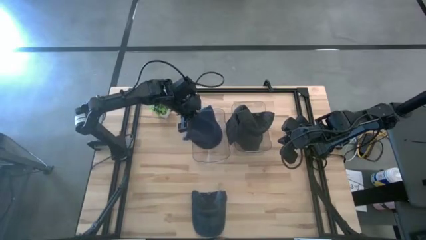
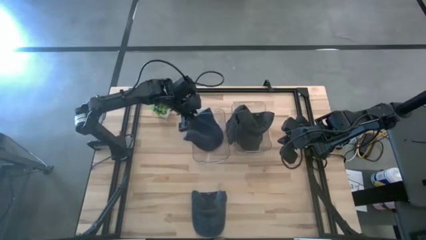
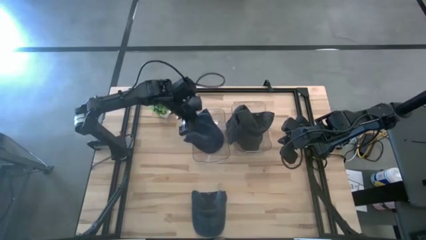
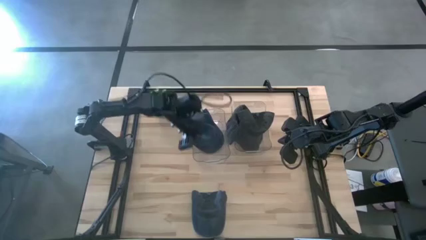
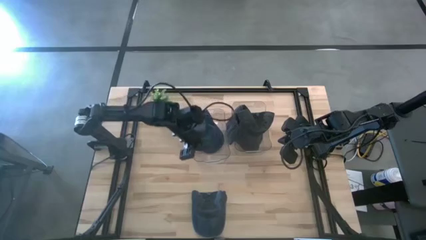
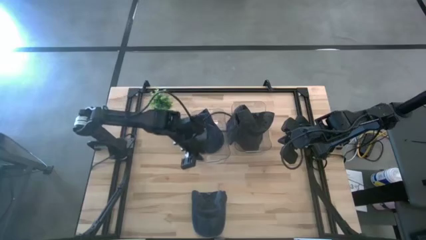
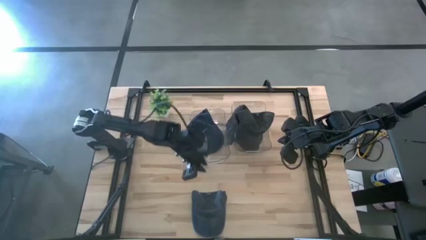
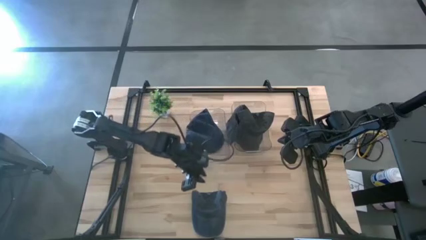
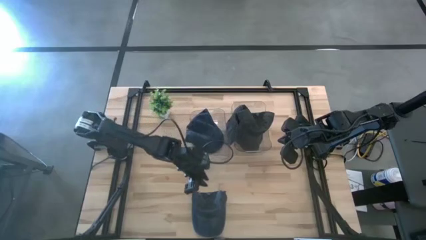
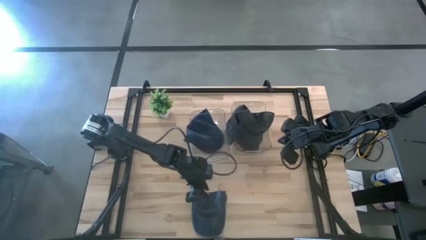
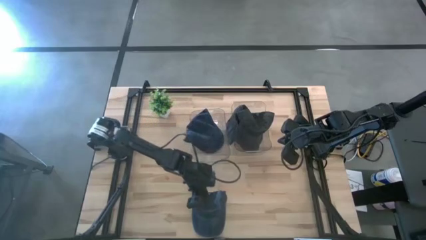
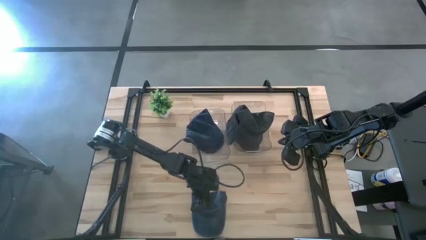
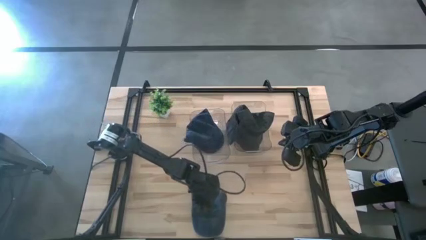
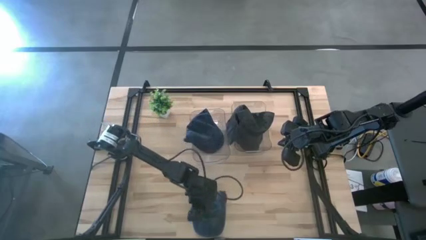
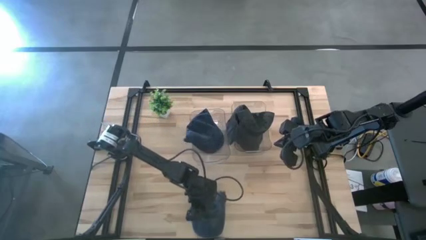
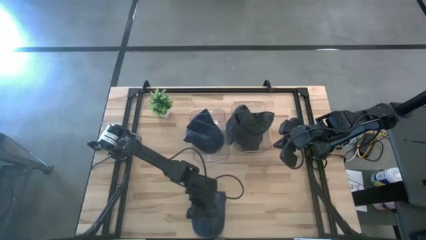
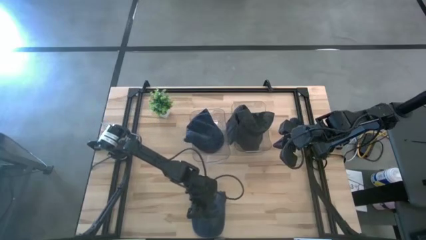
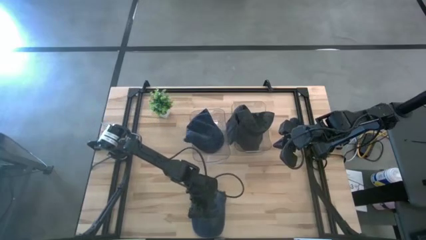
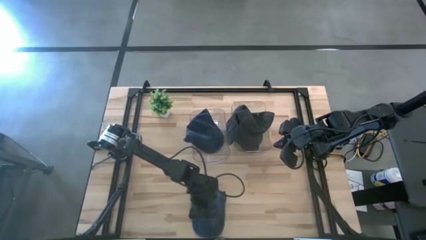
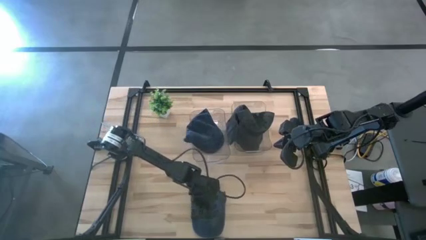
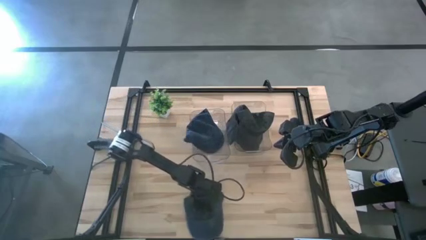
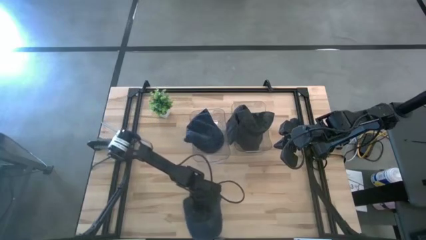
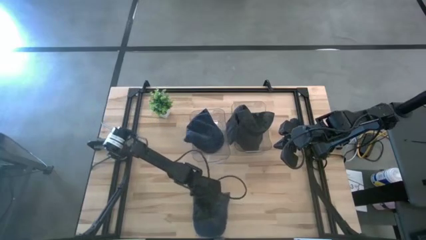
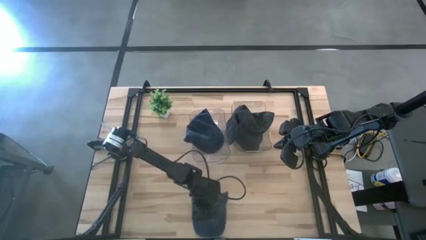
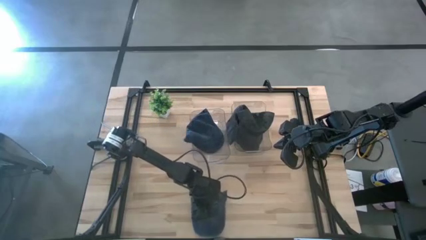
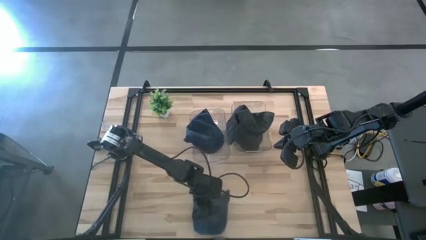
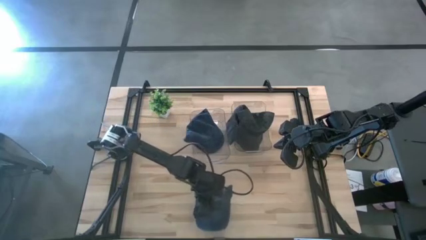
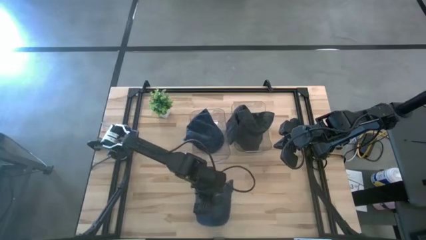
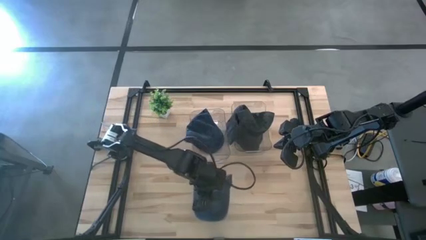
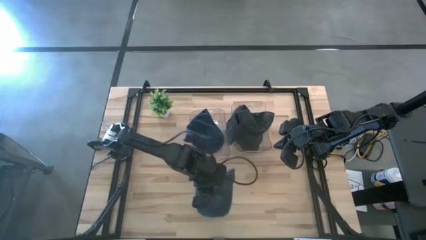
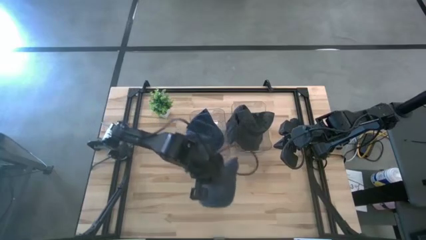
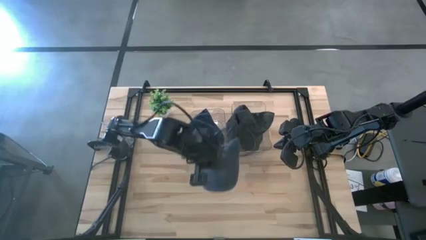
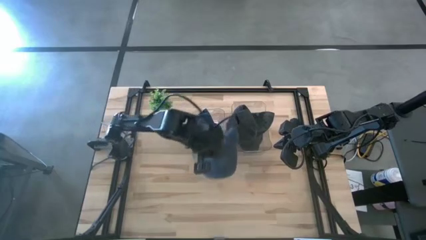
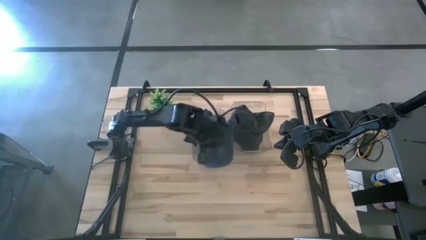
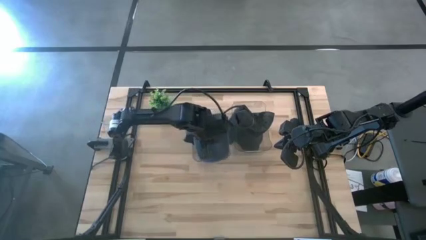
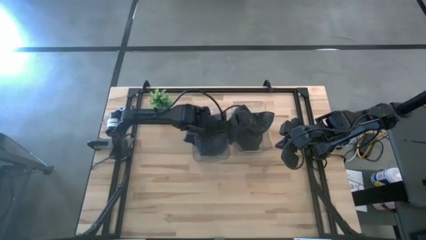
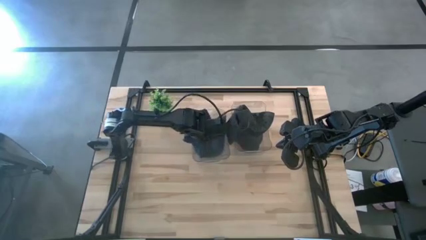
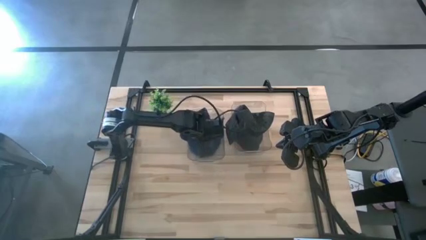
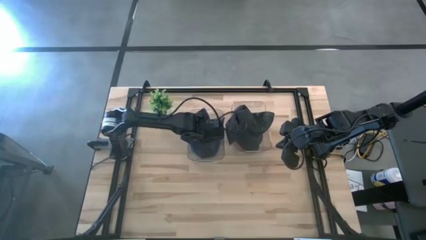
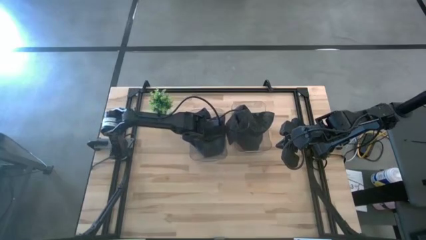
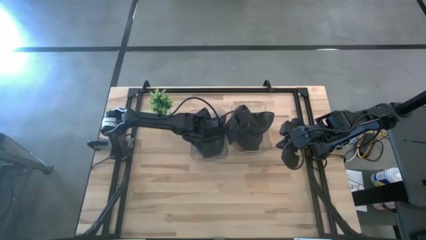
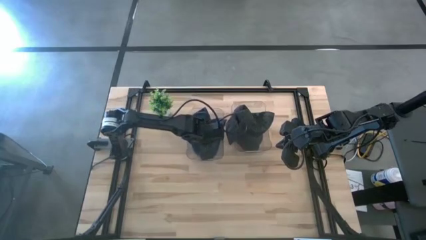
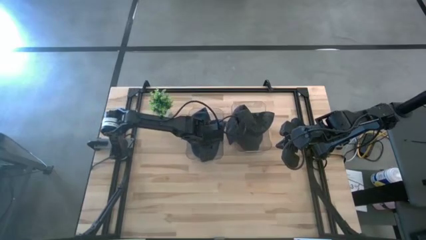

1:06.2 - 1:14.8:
Task: Pick & Place hat
Put the blue cap into the left transparent bin

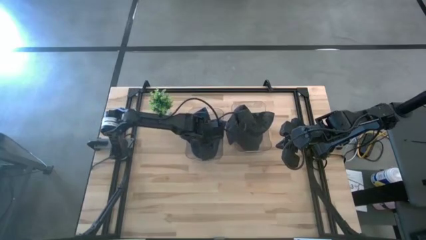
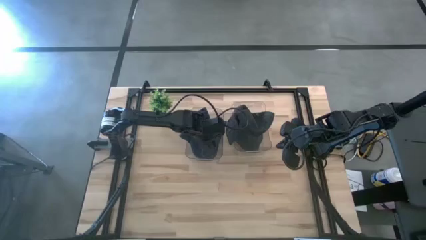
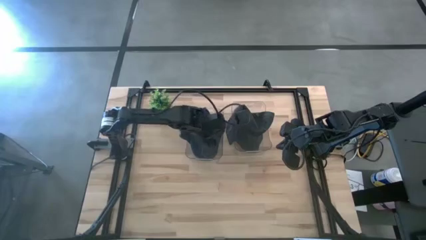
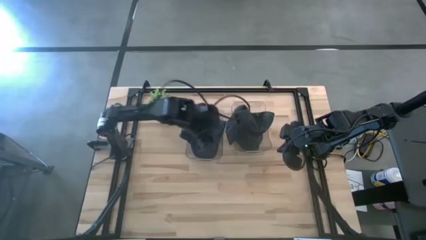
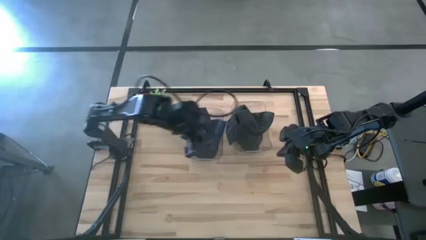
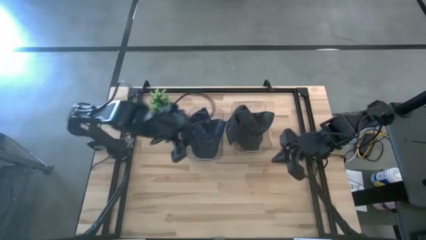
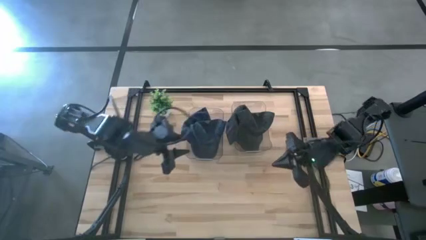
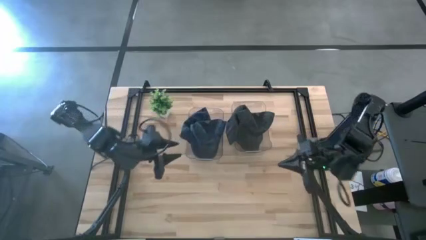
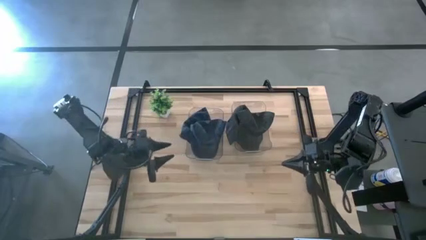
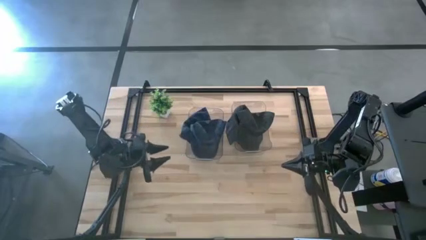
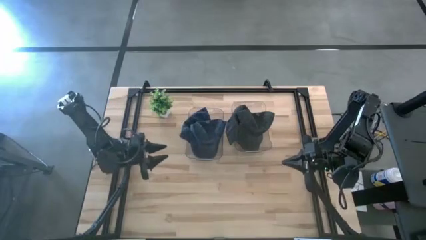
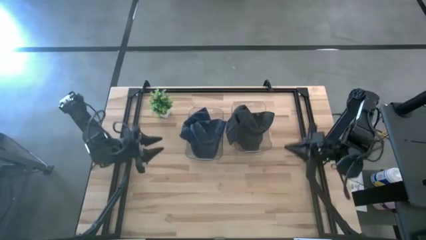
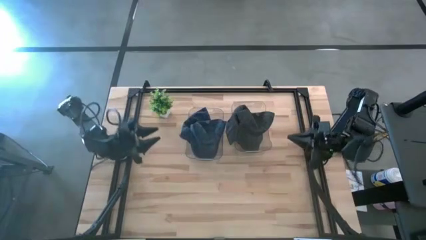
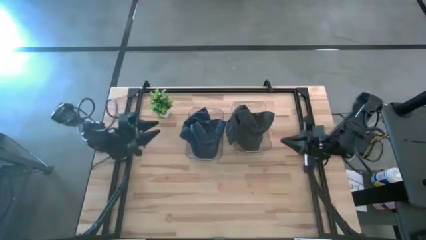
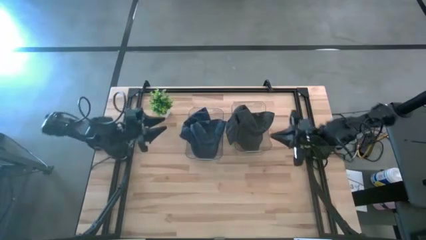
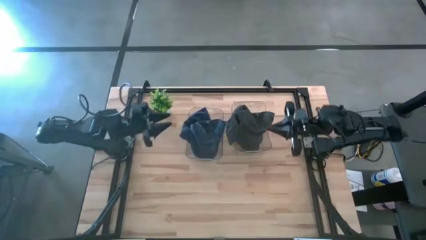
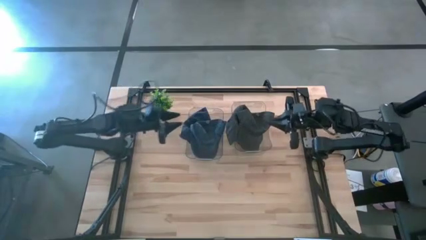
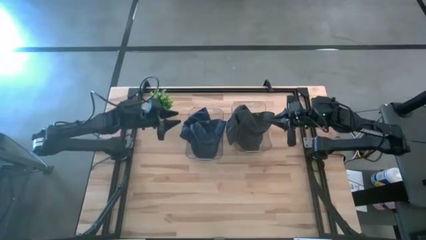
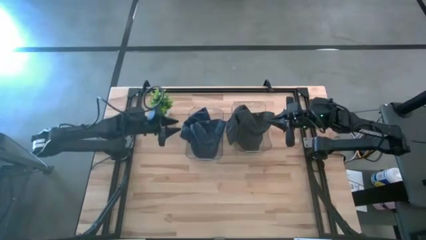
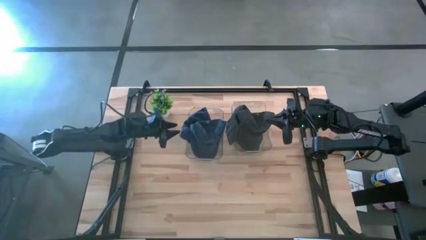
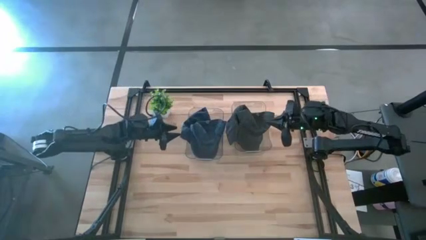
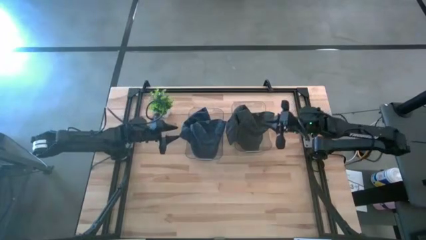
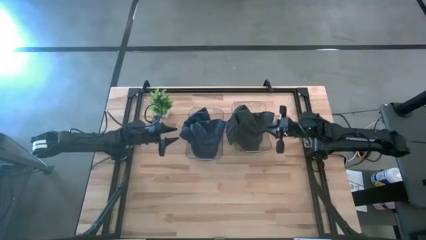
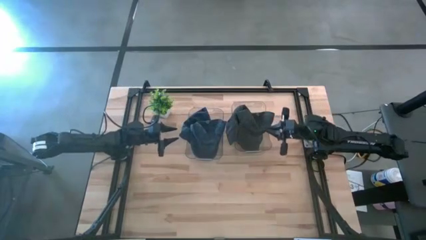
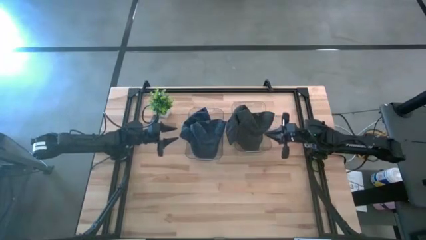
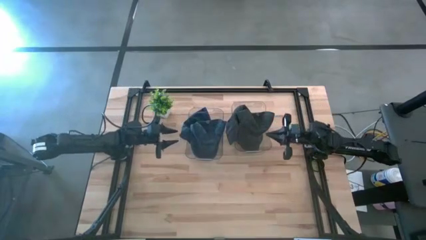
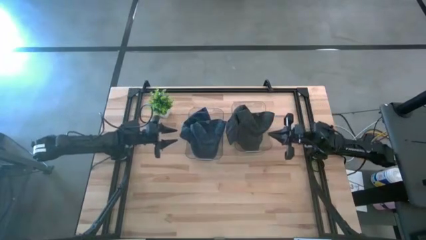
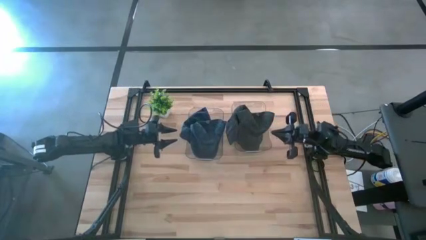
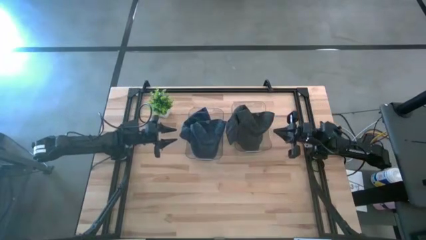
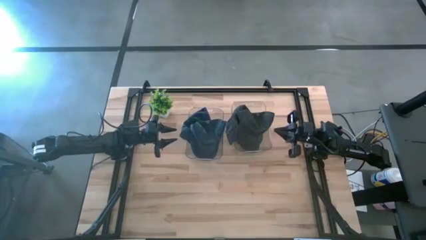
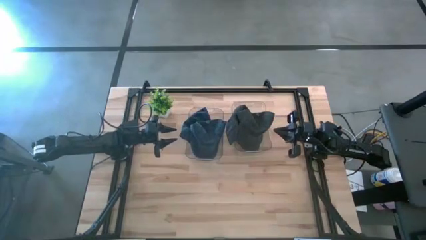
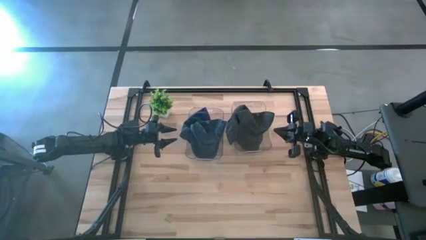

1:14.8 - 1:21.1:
Return to Home Position

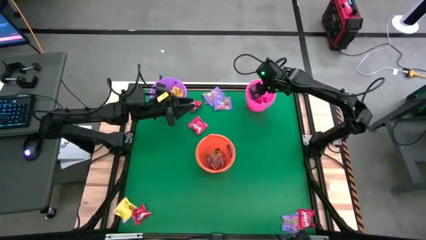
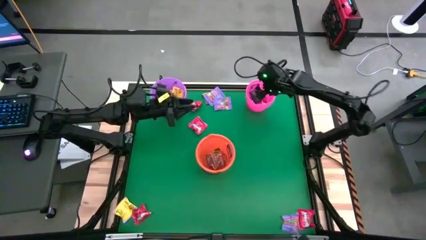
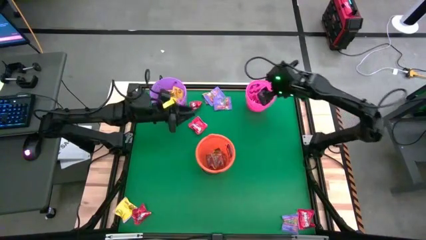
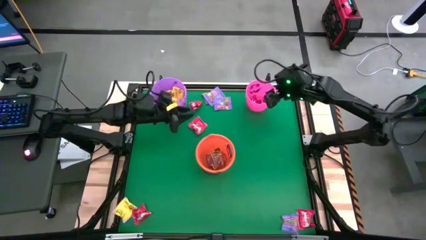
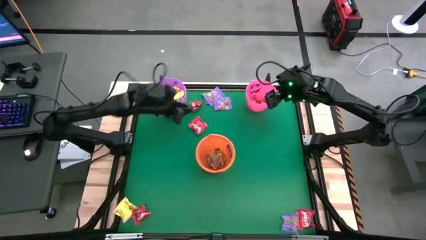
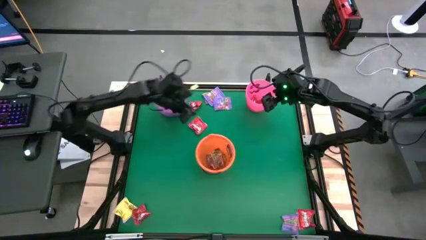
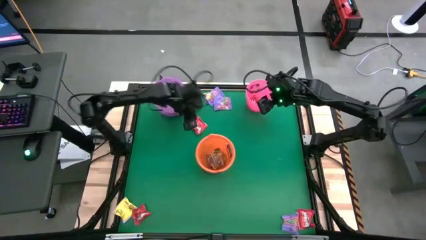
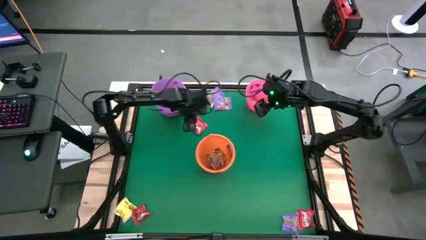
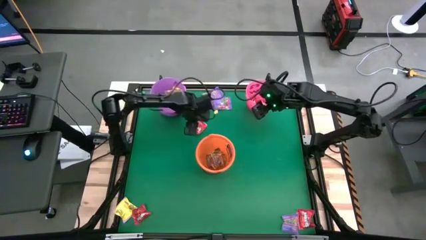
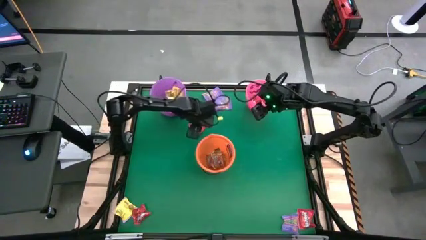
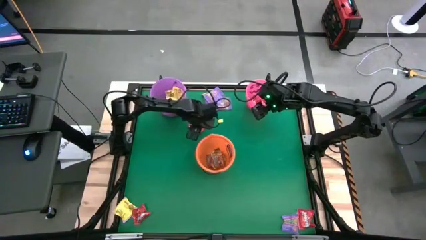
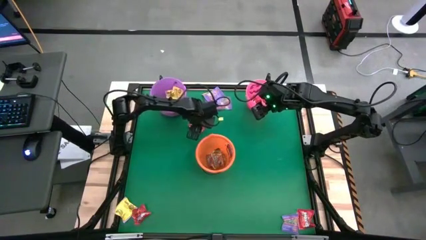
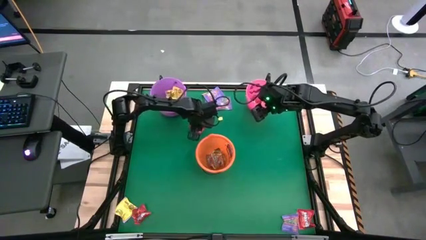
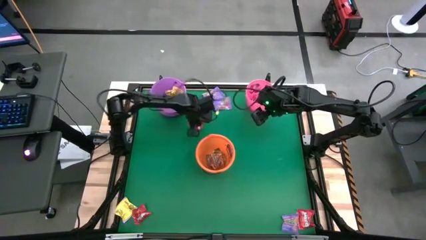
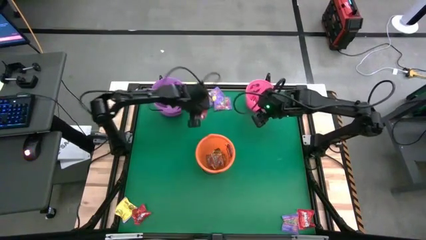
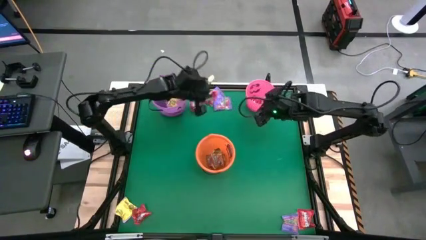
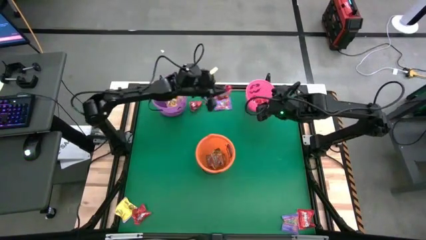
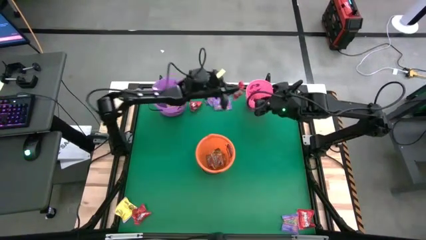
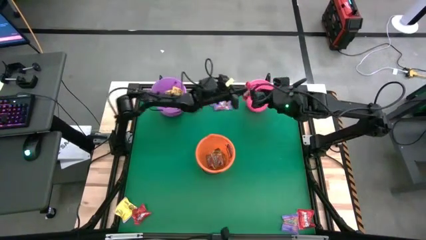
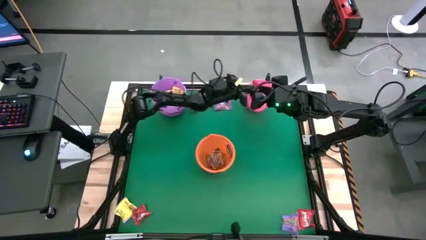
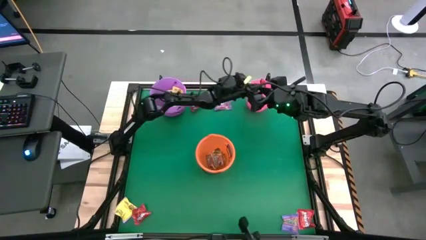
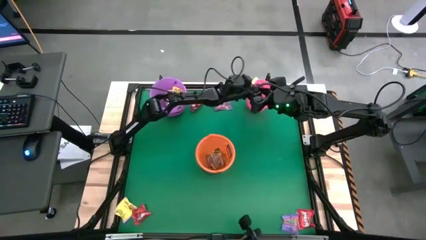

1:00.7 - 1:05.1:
Task: Sort candy by brand, put in halloween buckets
Put the red candy into the pink bucket
